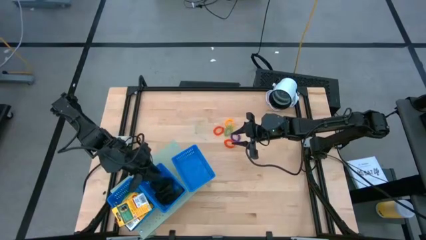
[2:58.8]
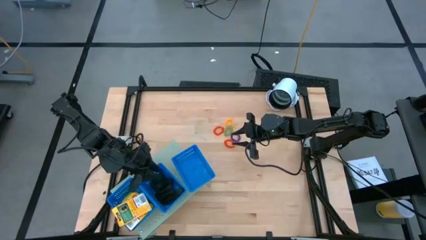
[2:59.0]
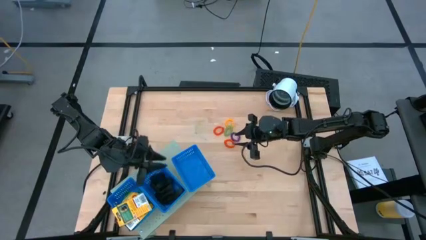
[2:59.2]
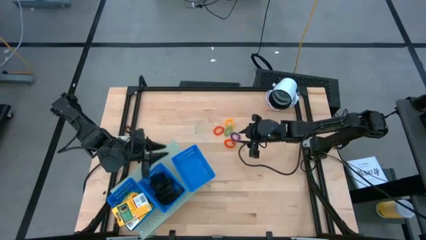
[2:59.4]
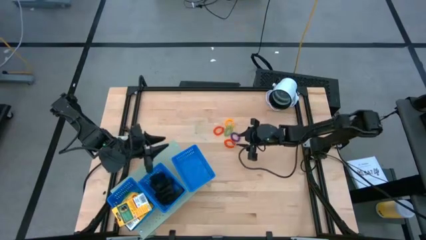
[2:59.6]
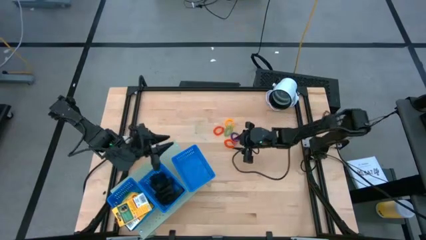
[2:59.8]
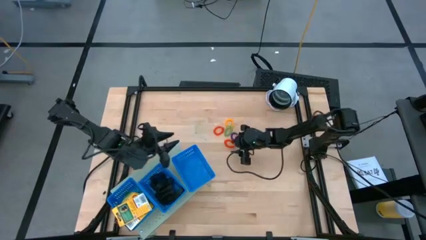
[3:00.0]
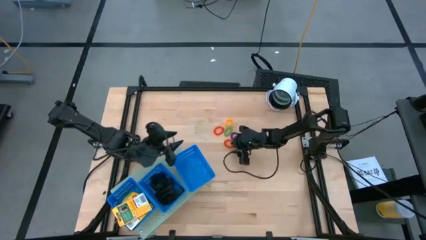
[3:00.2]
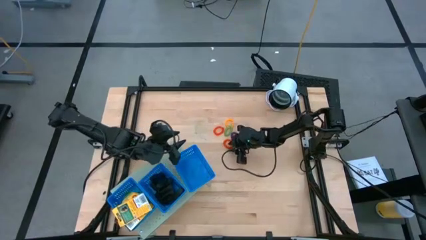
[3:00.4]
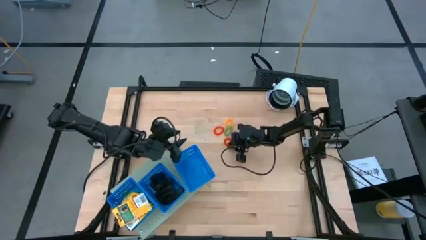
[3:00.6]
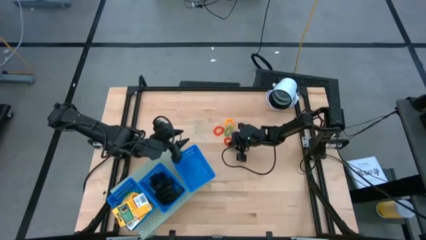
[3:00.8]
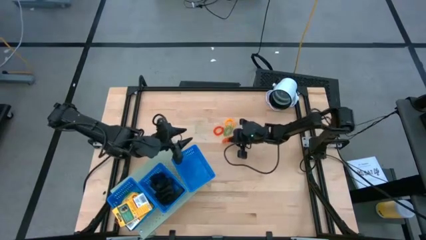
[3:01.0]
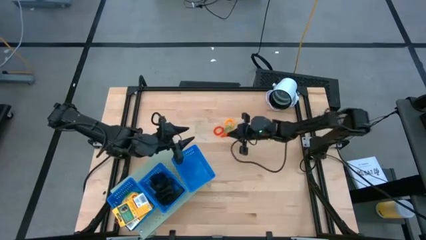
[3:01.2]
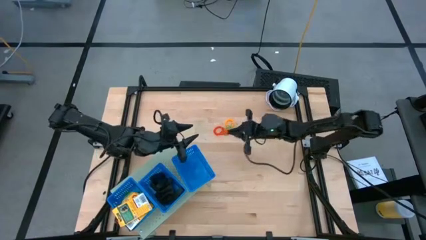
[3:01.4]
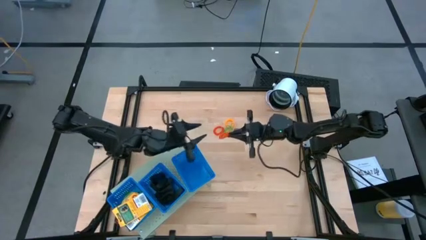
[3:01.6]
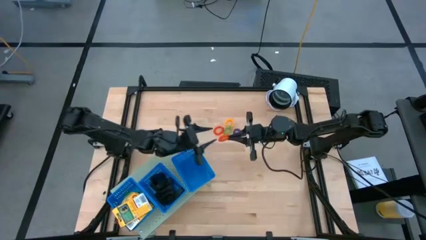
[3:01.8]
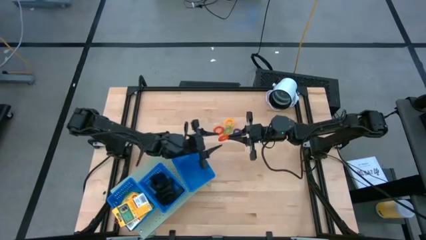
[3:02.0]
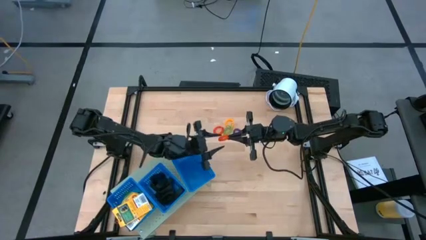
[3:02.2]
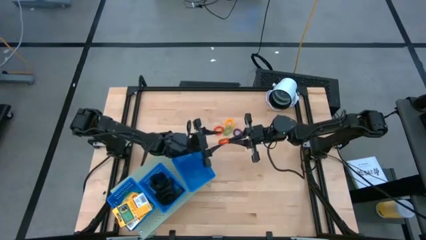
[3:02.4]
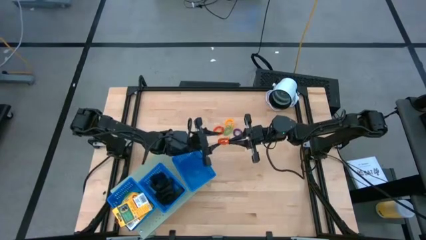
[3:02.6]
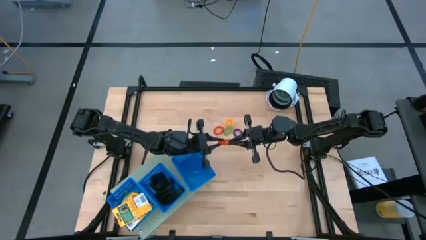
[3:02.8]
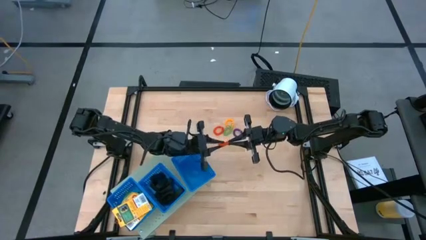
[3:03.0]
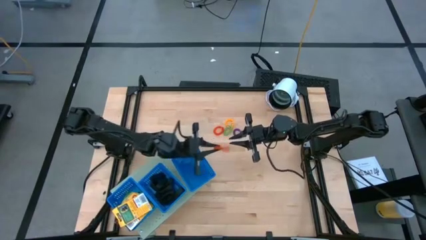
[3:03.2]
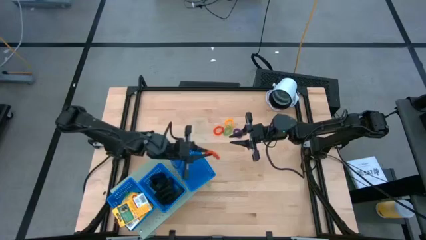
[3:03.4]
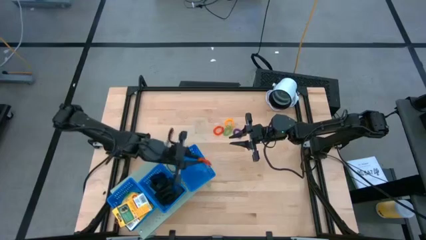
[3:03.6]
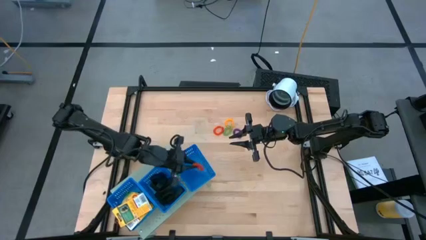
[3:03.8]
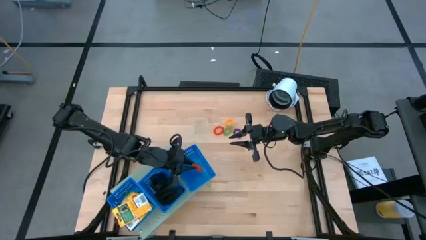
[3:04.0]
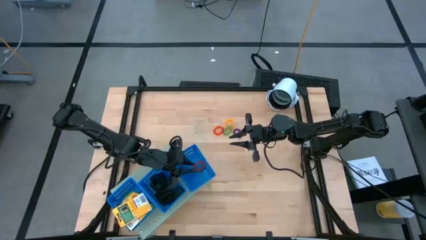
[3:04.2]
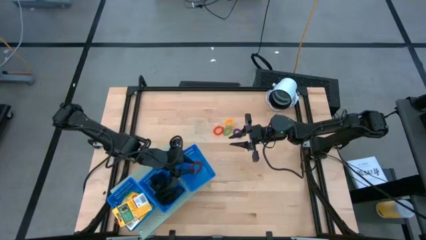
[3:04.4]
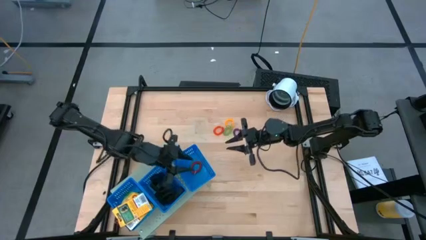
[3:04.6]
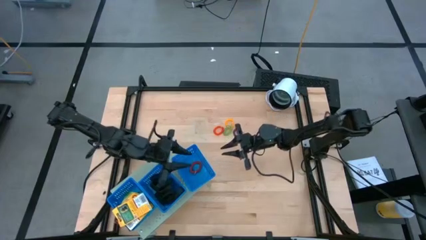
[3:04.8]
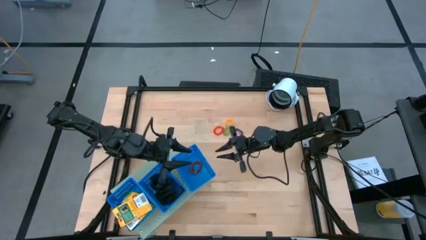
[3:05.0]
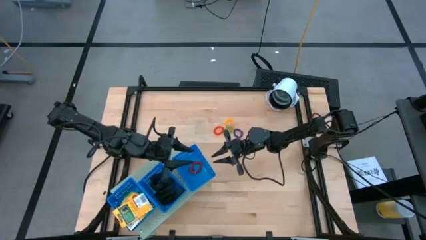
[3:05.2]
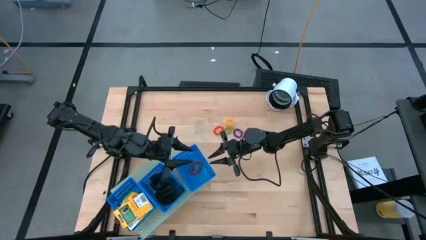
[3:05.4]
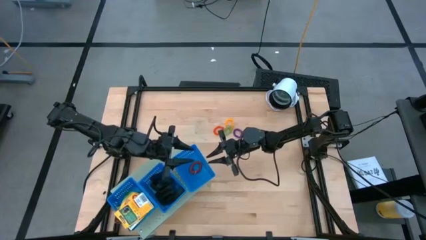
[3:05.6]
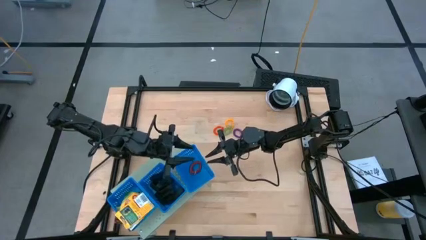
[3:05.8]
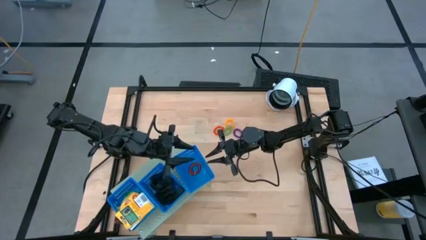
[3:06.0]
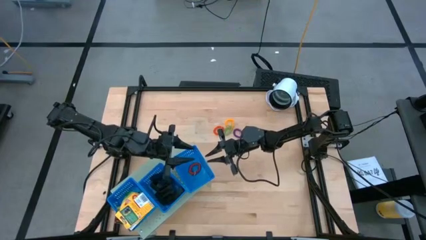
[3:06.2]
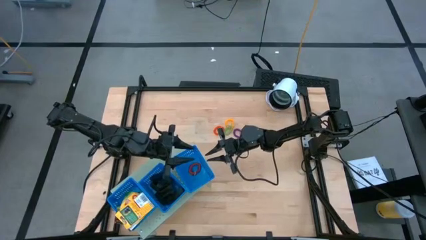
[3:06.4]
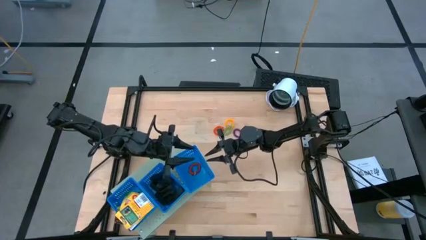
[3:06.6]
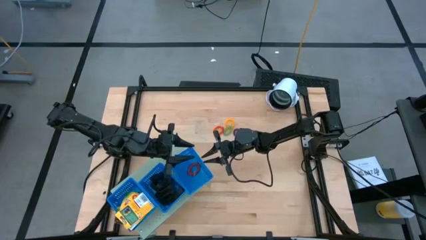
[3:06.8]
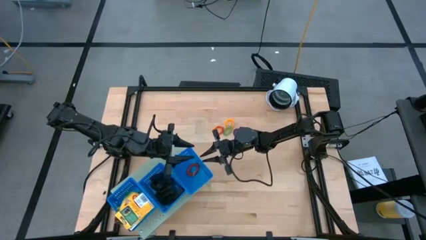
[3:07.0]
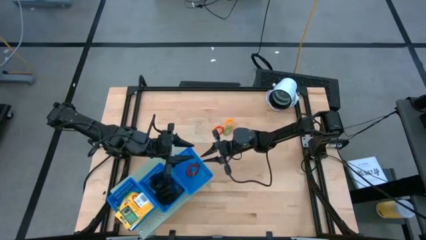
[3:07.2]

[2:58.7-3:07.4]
Task: Pick & Place Office Desk Supplies
Put the orange spring rubber band into the top blue basket on the shelf

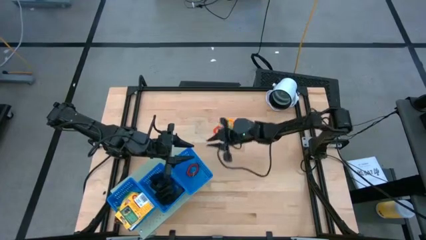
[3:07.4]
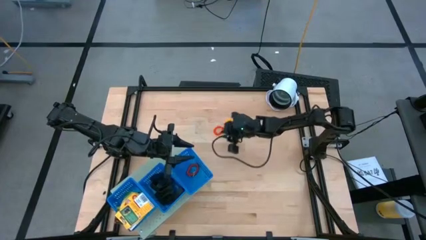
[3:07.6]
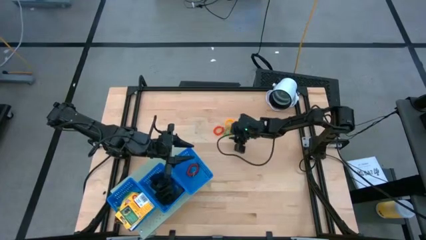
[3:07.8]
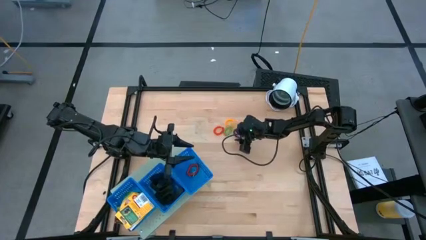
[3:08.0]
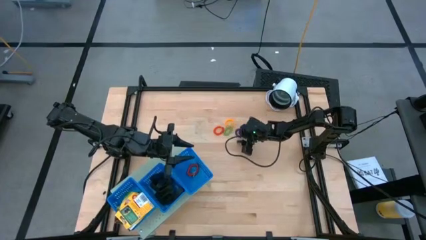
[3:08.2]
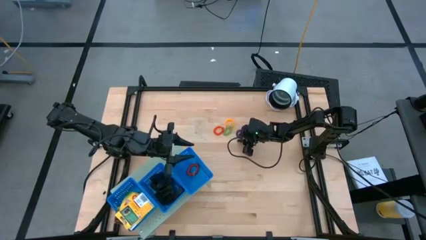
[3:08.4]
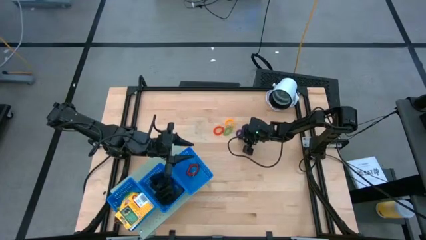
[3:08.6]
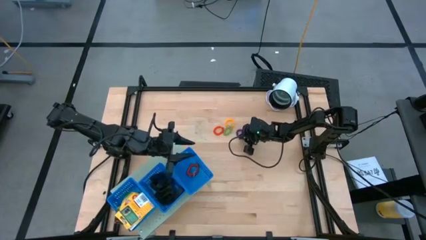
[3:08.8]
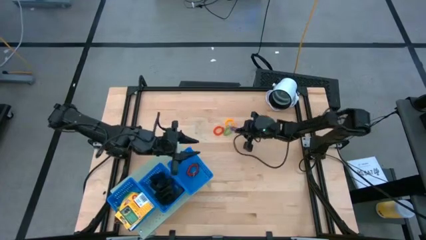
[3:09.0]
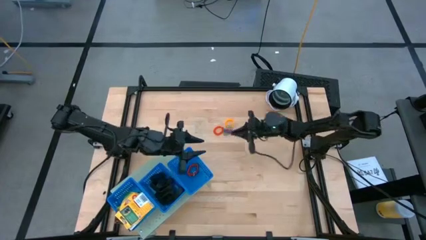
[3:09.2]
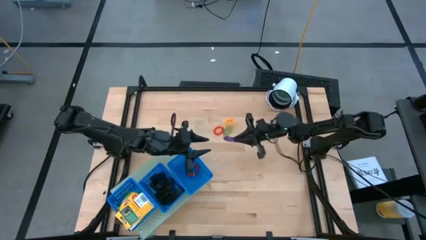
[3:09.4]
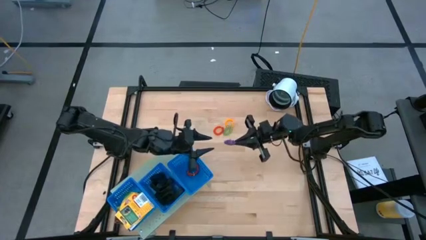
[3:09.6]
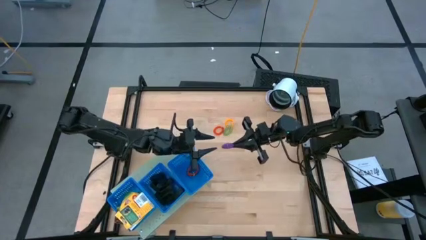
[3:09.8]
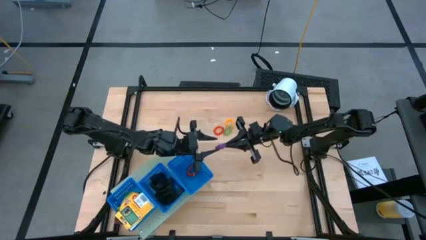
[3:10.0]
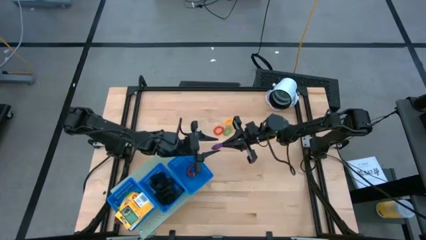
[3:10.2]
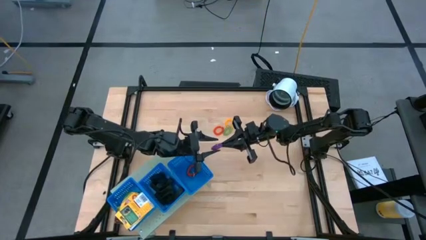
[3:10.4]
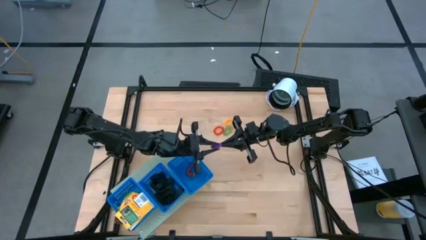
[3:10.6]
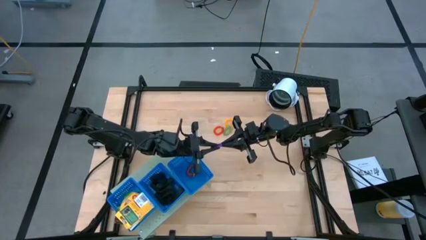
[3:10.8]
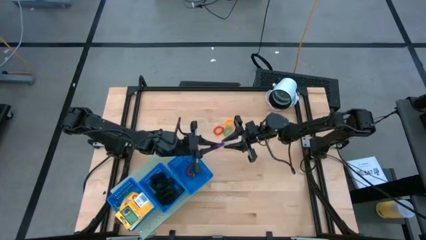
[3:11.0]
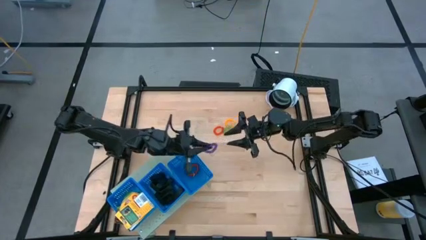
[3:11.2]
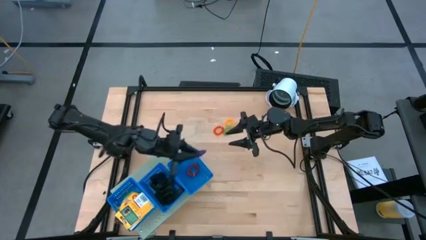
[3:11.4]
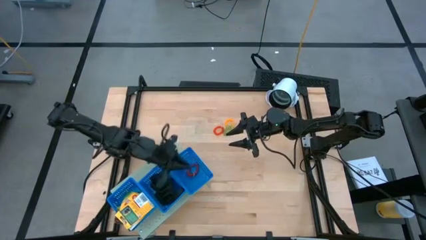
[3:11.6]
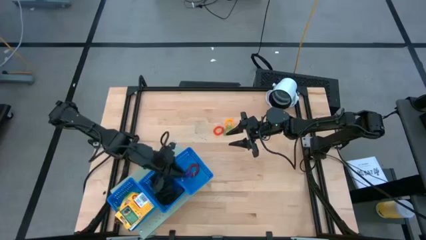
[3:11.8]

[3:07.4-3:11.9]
Put the purple spring rubber band into the top blue basket on the shelf

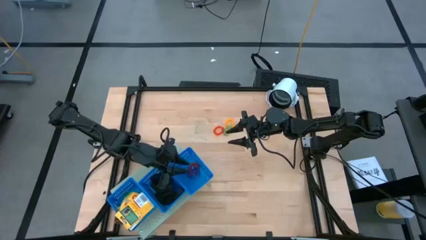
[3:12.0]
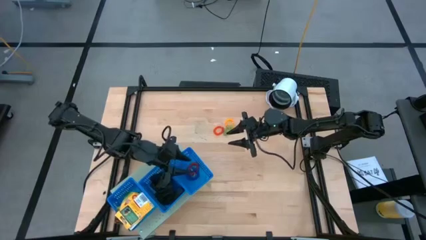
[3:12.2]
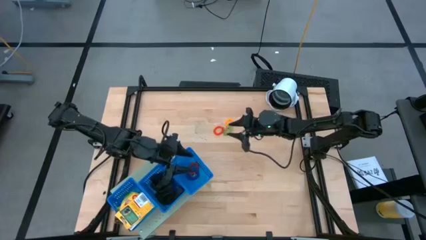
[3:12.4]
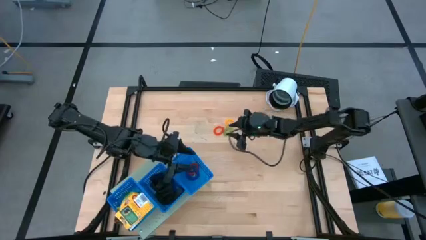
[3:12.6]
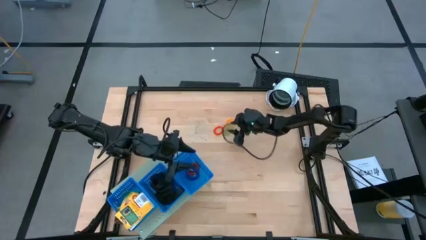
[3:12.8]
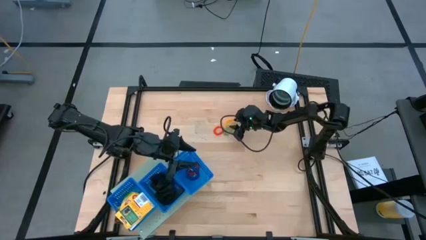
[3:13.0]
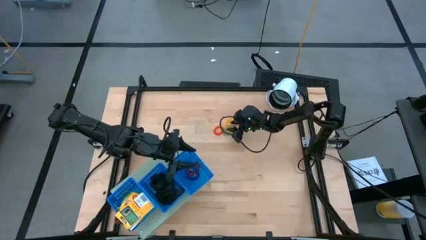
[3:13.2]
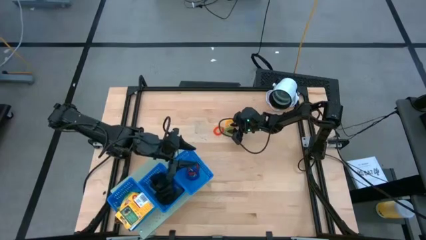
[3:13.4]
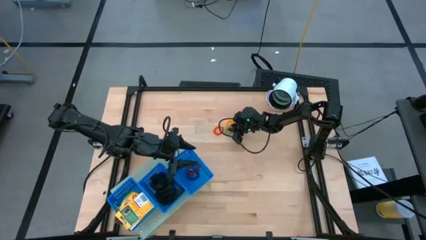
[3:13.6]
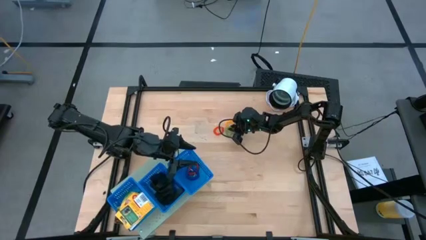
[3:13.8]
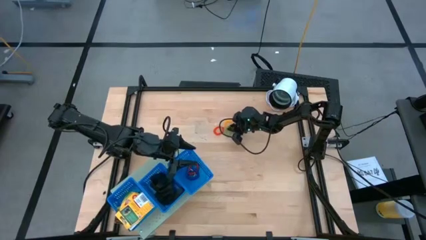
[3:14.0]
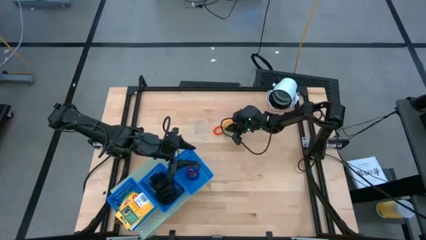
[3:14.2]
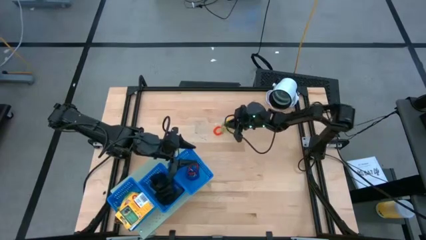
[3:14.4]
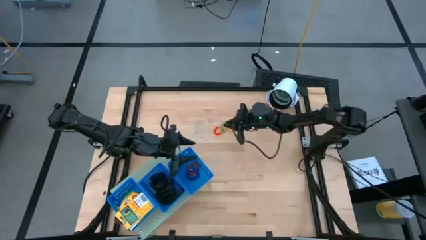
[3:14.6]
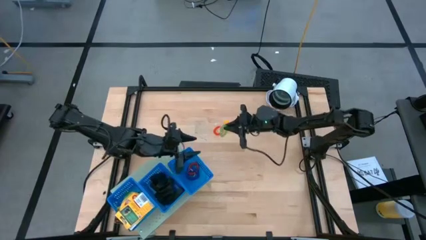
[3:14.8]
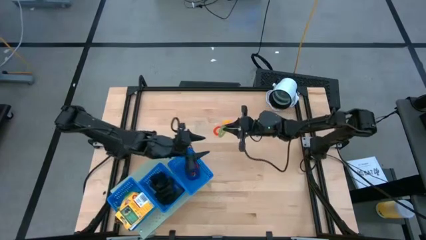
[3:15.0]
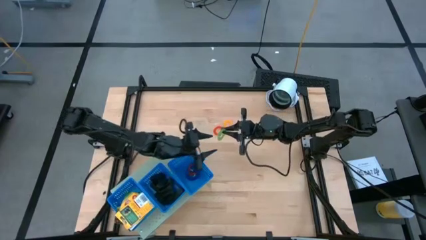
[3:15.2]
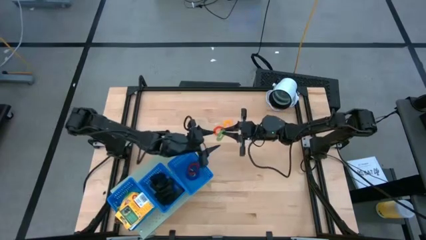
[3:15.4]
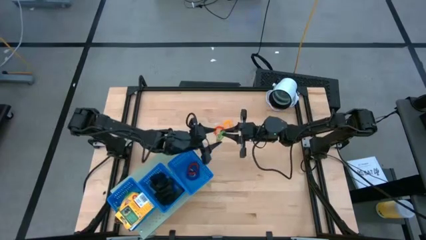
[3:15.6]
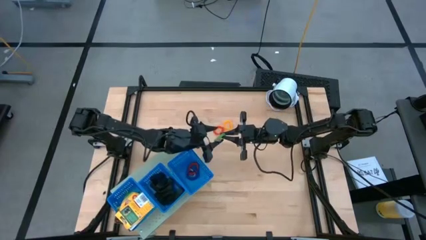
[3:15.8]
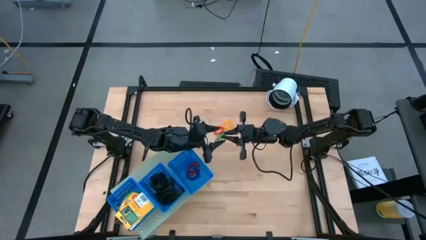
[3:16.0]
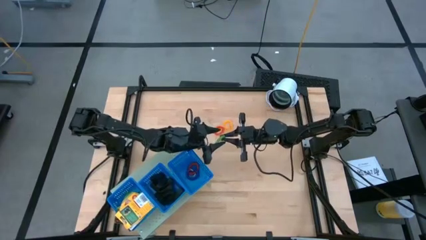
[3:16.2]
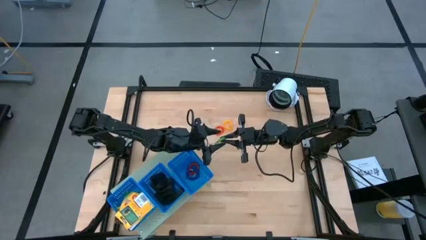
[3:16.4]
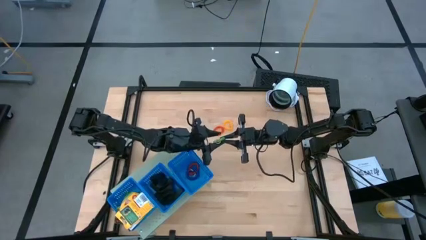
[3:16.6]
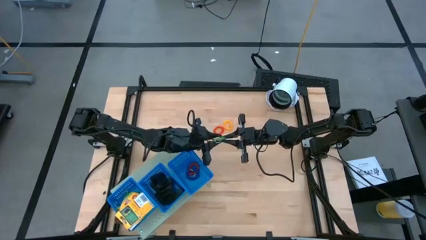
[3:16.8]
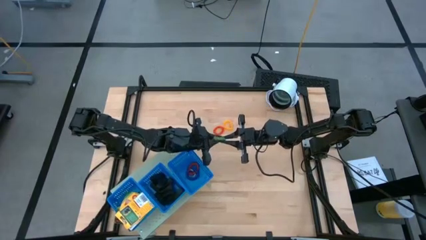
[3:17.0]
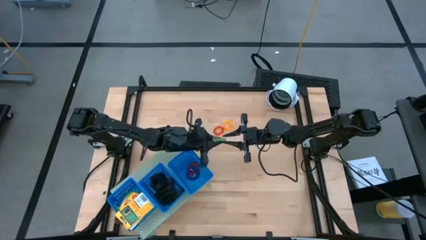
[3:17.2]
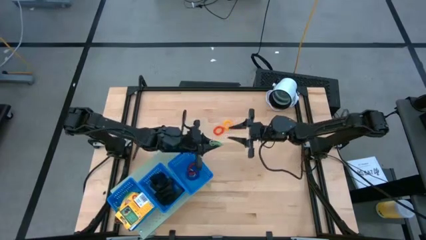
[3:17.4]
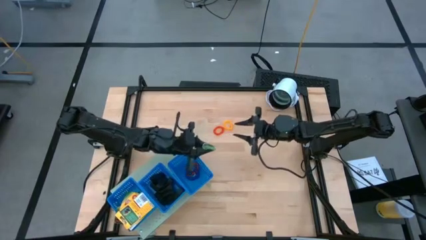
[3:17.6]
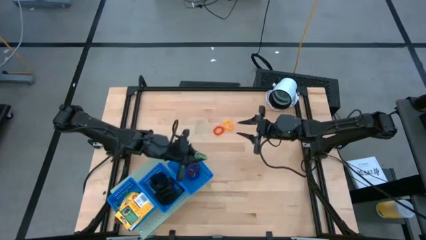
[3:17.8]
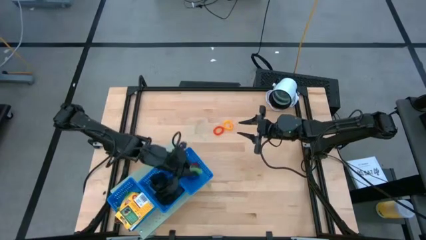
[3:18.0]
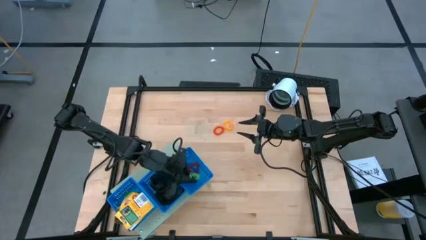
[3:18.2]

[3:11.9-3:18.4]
Put the green spring rubber band into the top blue basket on the shelf
